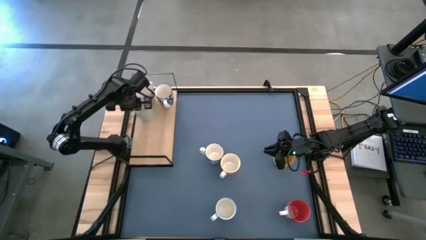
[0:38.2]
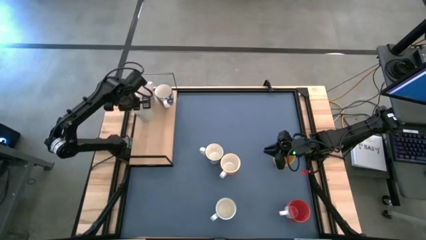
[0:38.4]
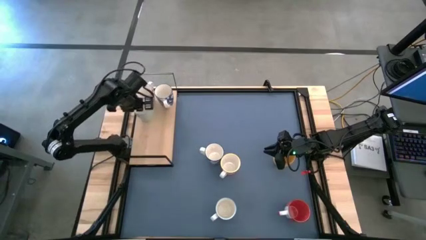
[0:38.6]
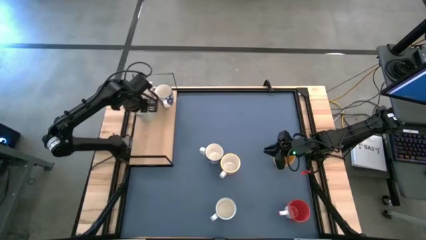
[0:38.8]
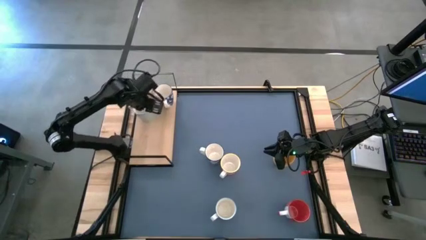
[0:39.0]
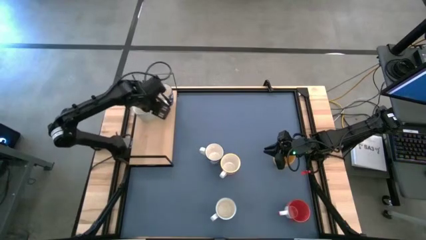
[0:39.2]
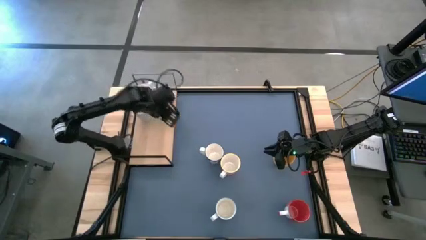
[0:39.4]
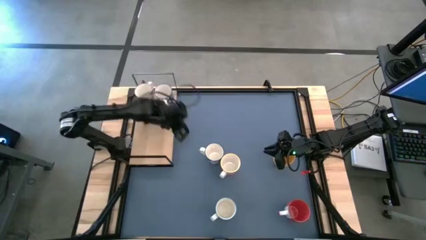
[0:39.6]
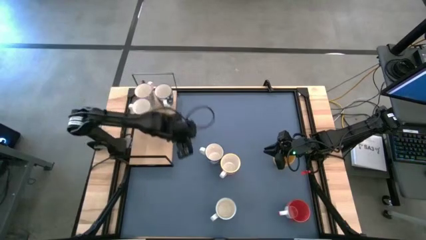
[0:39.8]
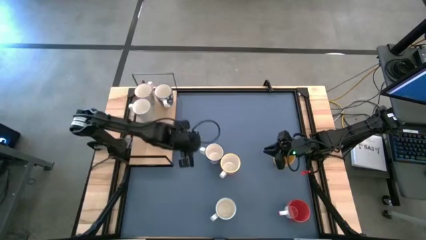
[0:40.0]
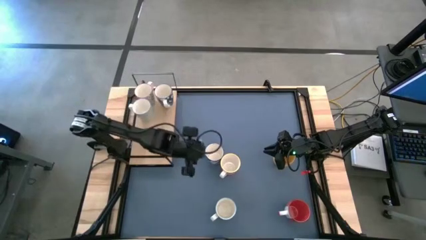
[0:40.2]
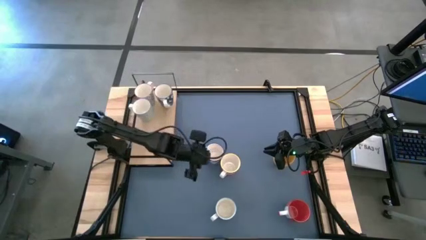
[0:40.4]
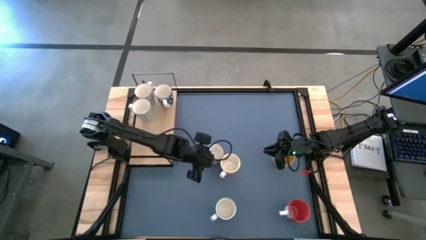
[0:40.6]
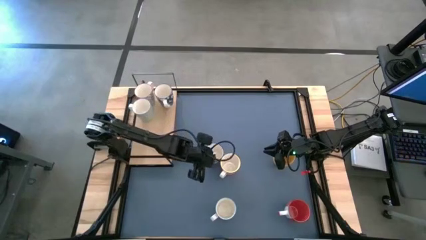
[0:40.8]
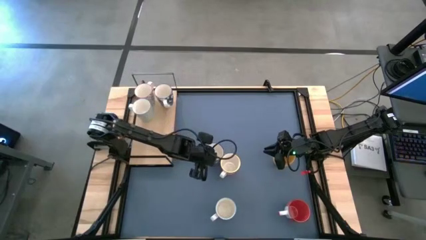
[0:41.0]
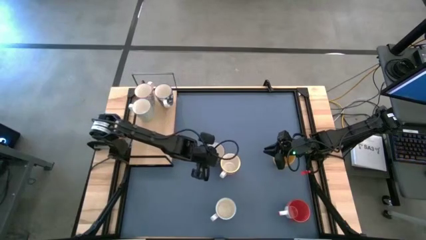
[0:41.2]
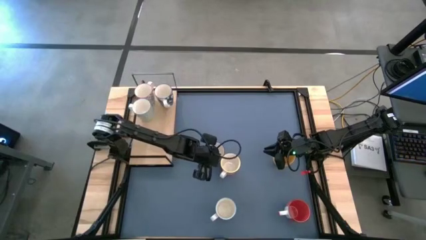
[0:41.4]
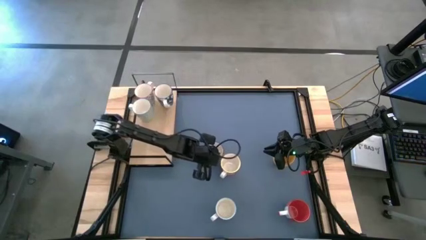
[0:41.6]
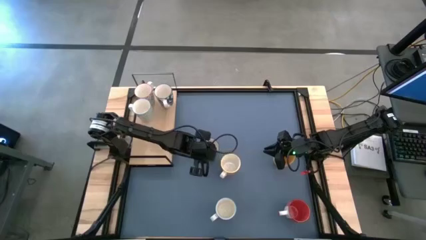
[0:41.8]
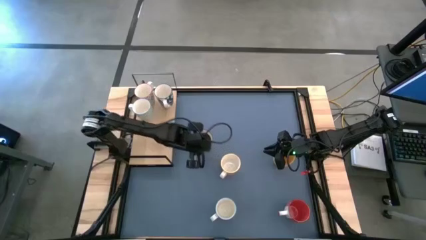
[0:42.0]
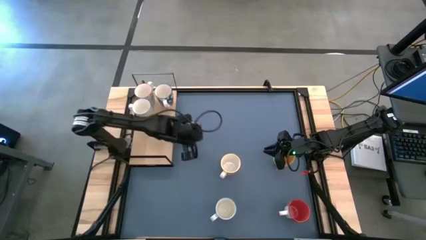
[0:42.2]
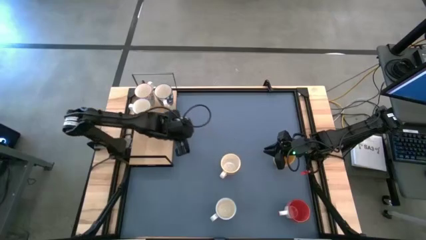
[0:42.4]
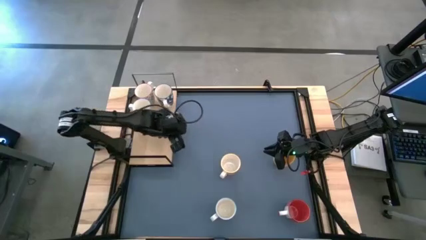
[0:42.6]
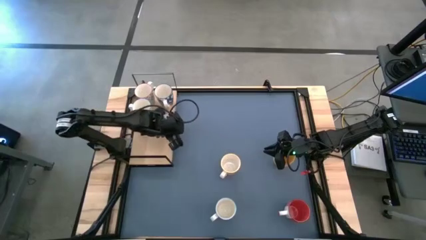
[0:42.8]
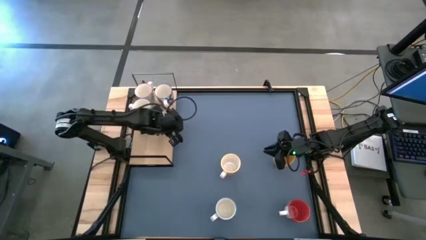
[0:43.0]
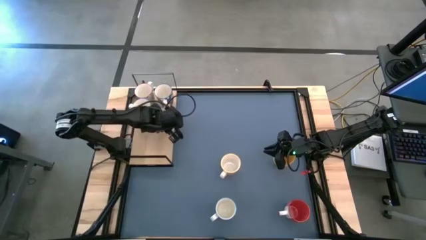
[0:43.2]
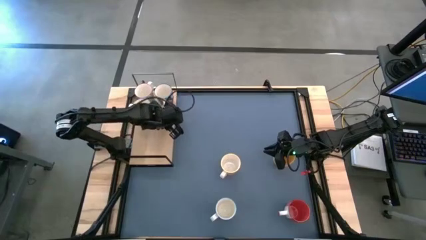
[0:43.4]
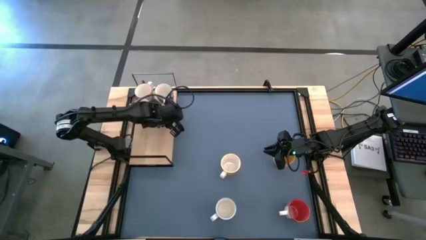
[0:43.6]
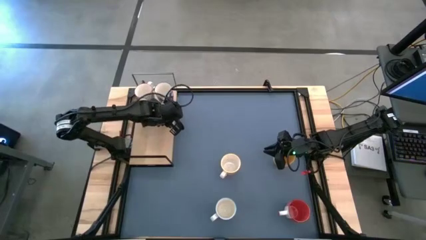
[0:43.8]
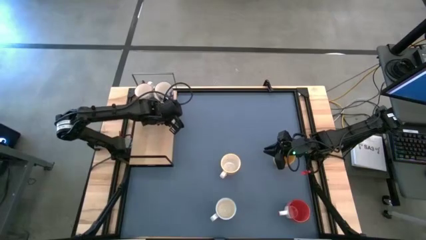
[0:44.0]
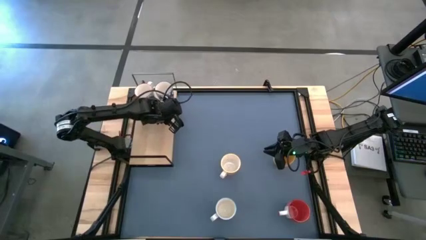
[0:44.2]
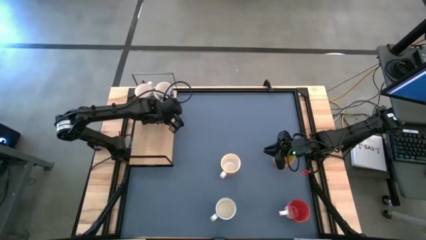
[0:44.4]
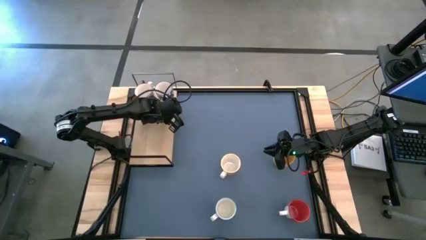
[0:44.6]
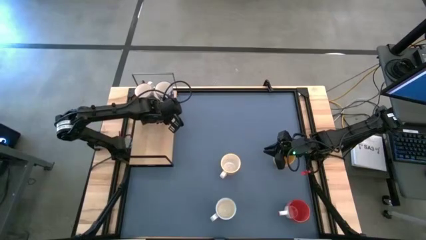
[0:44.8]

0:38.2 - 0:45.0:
Task: Place coffee mugs
Put the blue patterned mug on the shelf

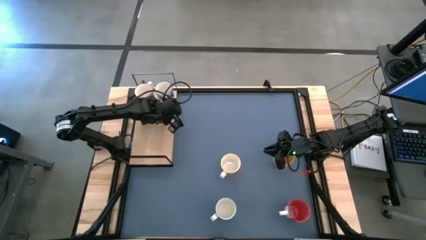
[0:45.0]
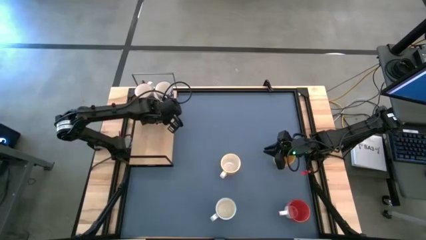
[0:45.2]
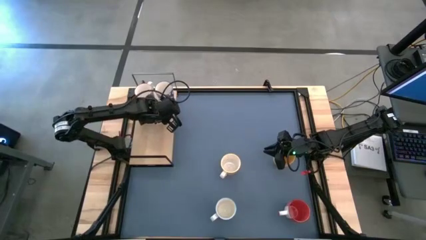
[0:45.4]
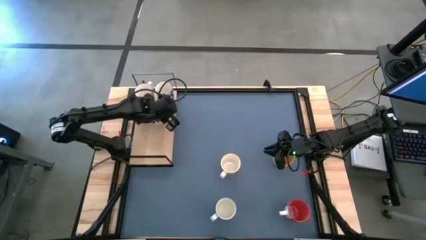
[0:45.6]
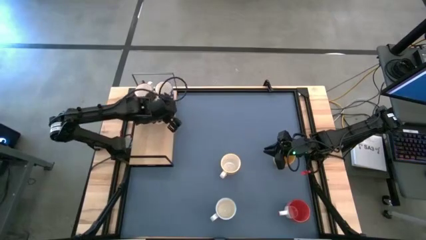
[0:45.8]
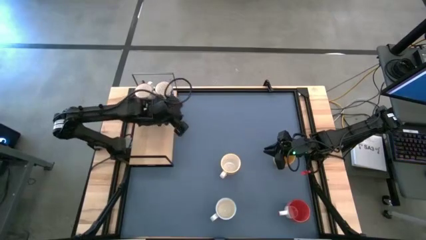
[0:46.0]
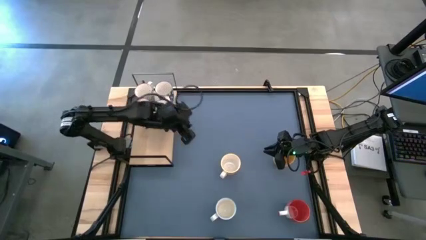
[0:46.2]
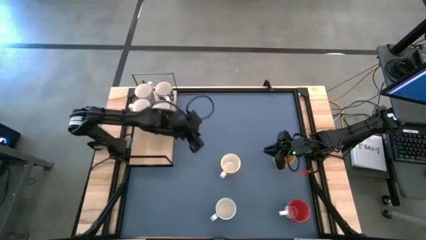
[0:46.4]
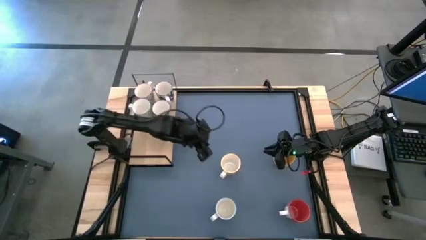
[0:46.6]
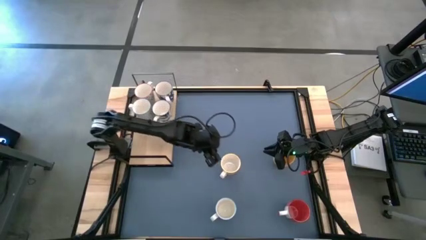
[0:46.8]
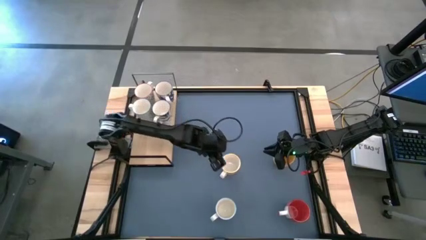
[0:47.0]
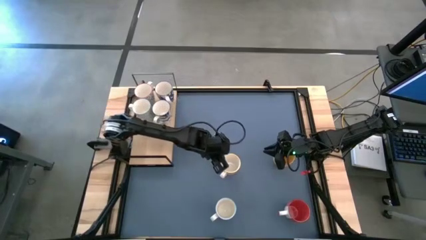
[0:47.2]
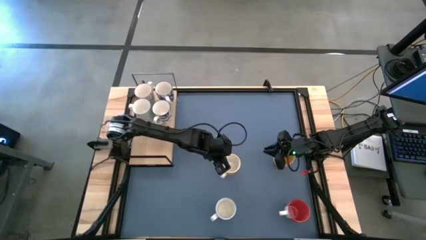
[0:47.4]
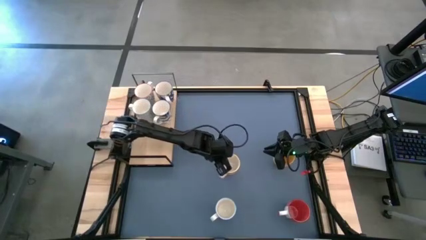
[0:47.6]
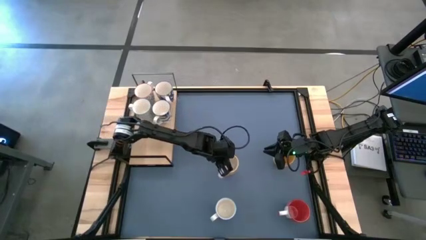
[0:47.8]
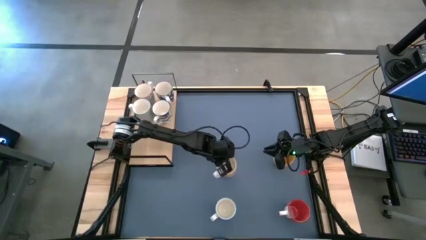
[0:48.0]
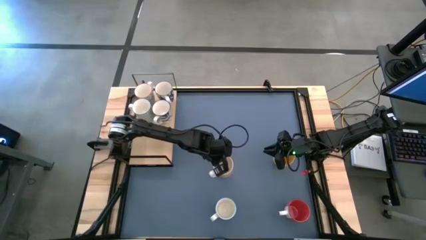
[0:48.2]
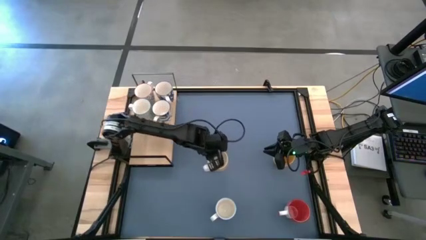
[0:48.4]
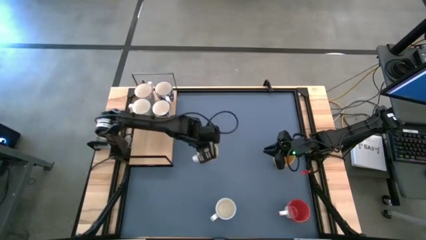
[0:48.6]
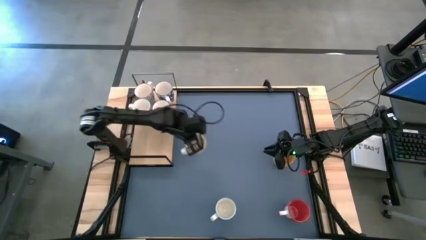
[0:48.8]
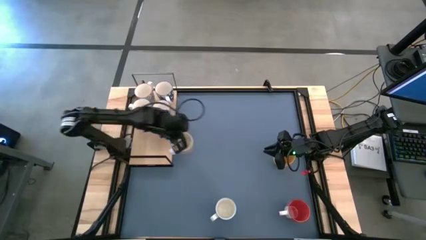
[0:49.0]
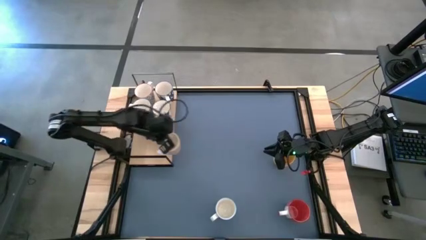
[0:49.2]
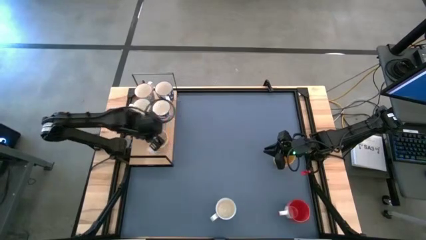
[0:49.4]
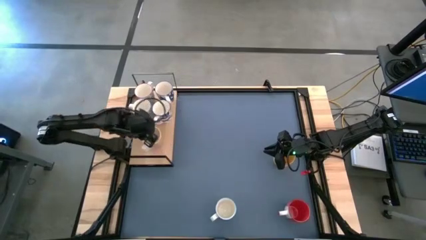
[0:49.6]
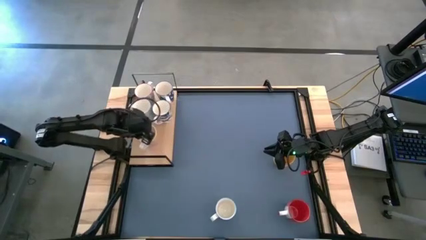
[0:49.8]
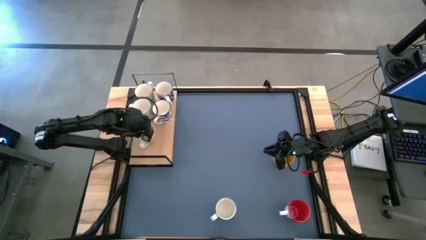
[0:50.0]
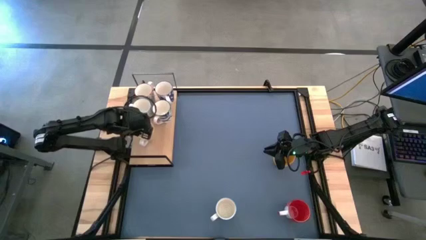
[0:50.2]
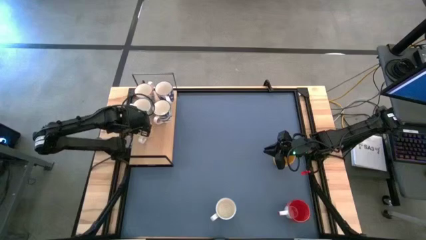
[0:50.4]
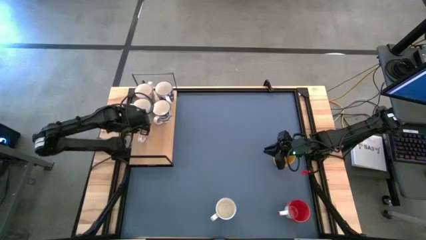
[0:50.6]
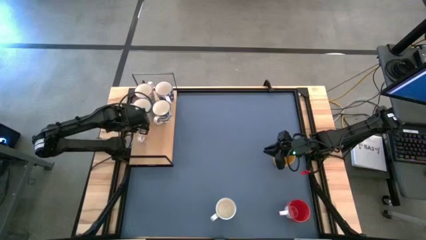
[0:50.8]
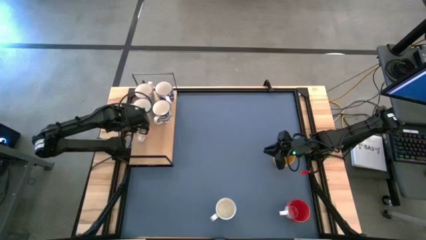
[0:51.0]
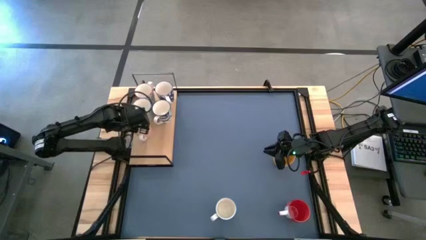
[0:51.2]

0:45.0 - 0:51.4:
Put the red patterned mug on the shelf

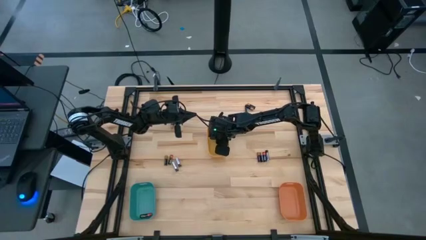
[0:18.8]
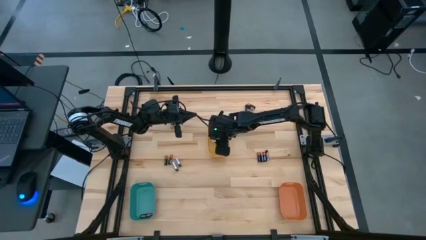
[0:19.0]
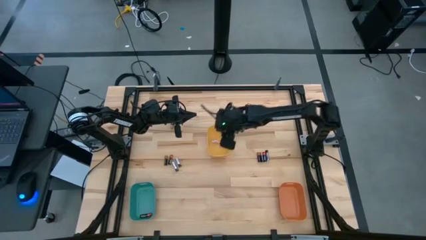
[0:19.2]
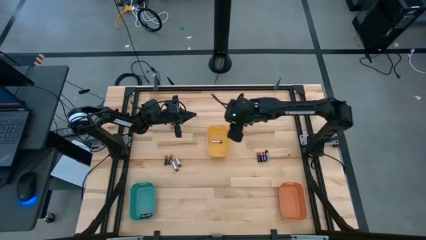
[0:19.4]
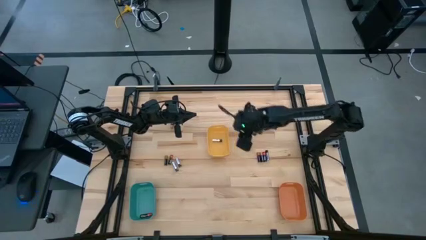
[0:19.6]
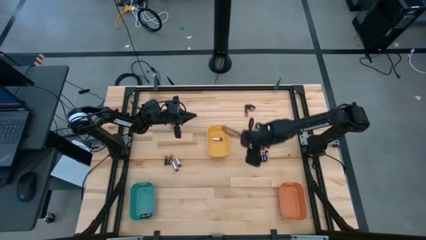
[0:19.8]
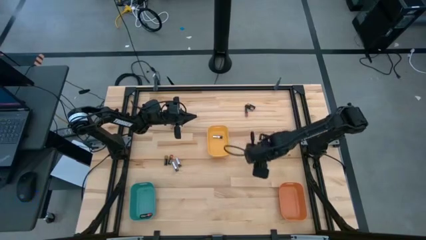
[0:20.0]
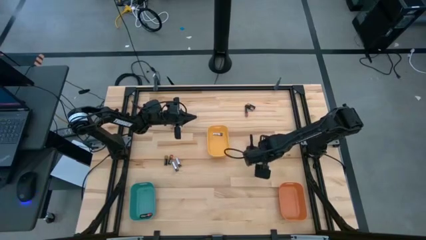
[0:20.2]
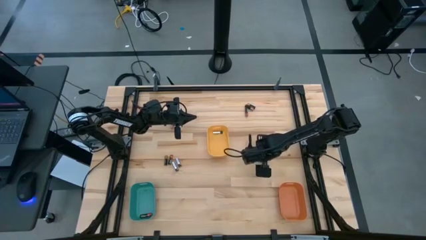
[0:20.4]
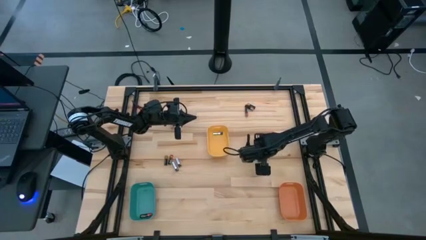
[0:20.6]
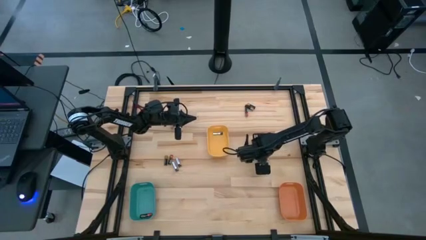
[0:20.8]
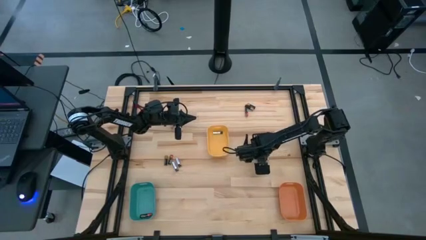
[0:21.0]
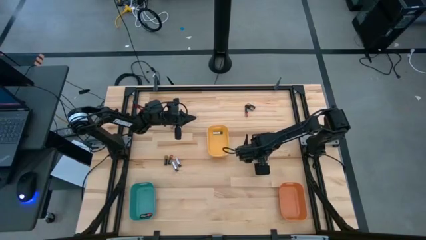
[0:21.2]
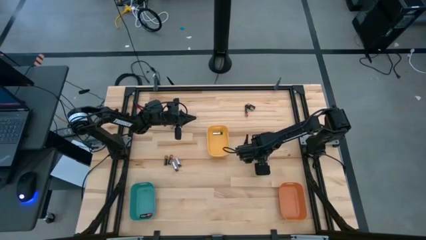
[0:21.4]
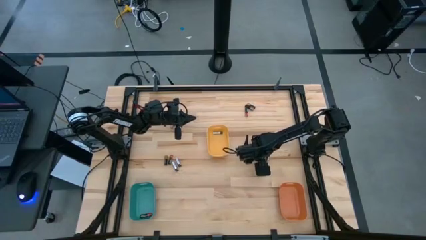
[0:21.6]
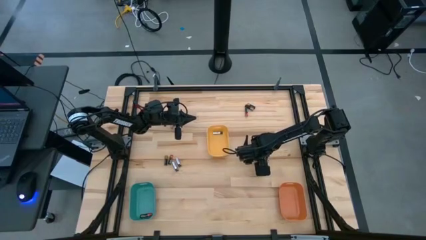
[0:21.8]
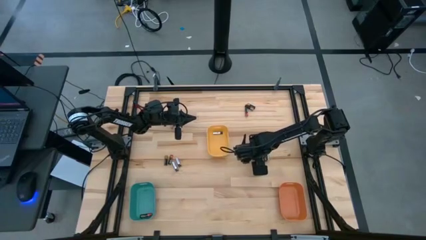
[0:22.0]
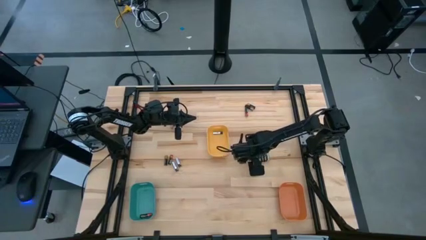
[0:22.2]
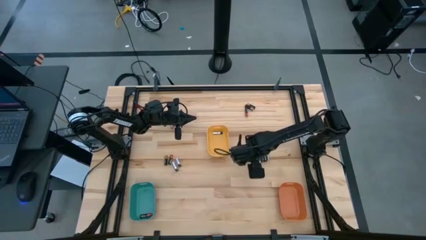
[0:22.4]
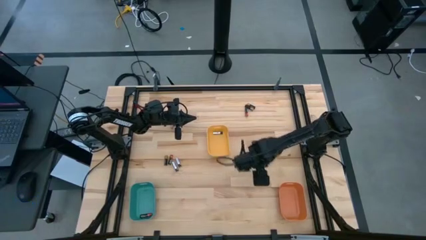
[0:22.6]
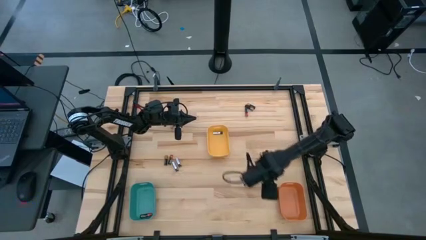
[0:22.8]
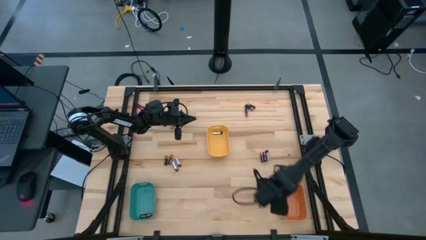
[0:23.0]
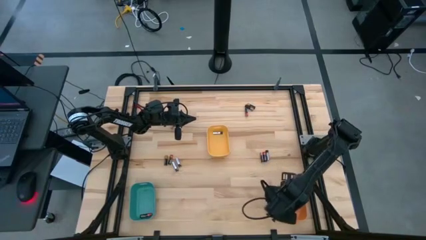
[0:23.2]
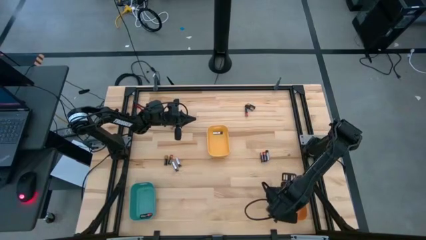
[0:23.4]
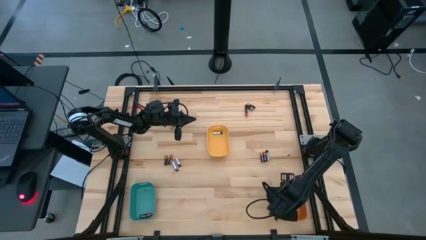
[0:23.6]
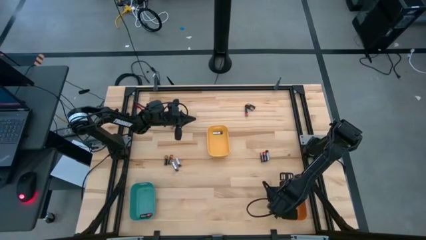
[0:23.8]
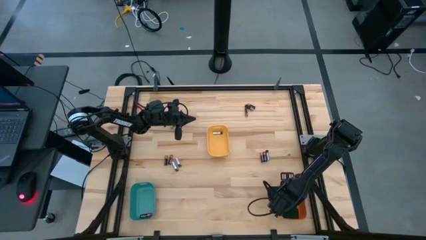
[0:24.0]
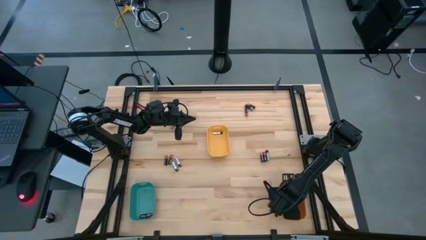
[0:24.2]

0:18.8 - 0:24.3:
Task: Sort batteries
Put the brown battery into the orange bin
